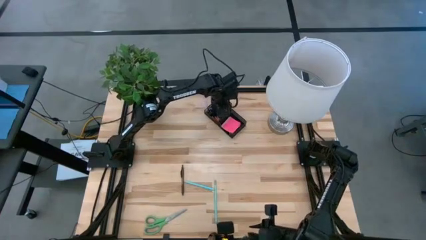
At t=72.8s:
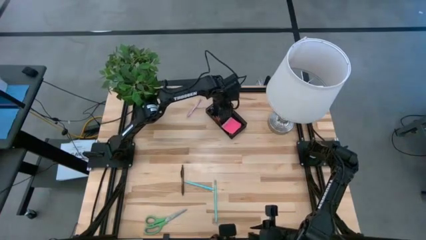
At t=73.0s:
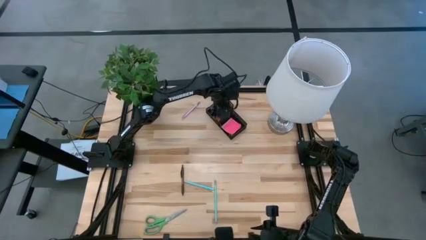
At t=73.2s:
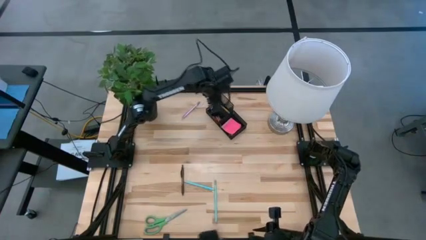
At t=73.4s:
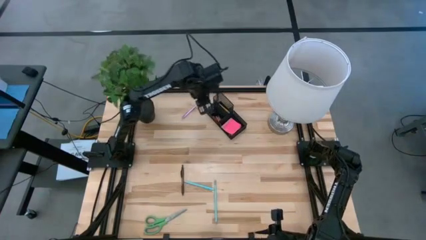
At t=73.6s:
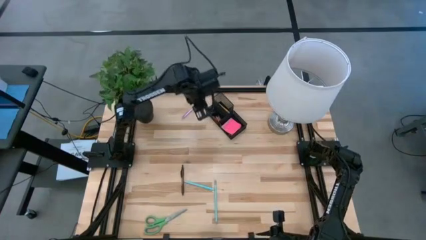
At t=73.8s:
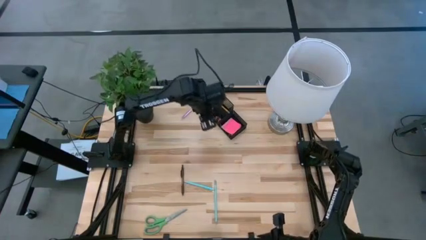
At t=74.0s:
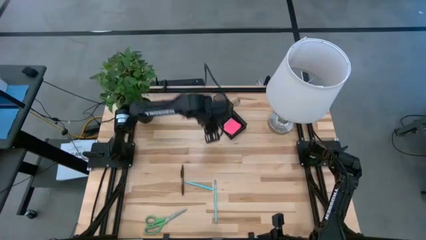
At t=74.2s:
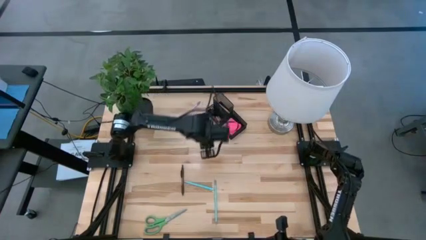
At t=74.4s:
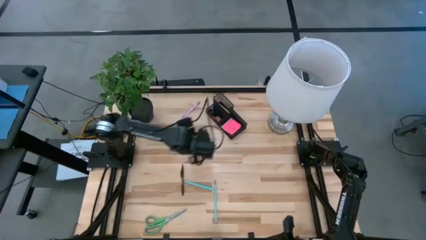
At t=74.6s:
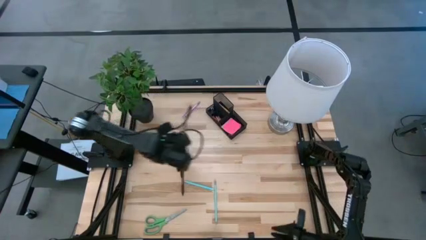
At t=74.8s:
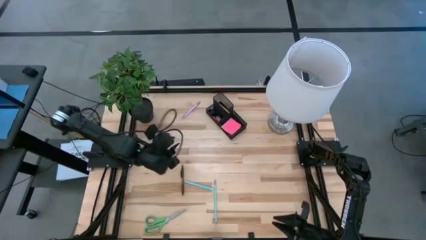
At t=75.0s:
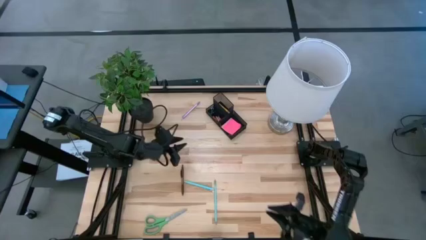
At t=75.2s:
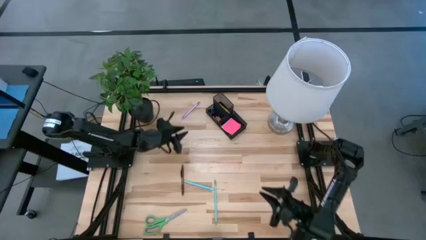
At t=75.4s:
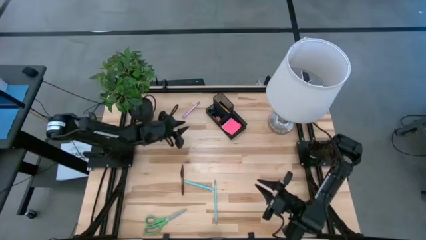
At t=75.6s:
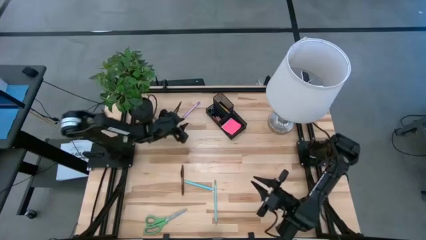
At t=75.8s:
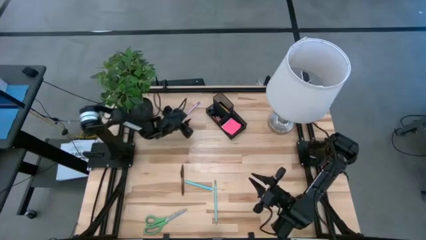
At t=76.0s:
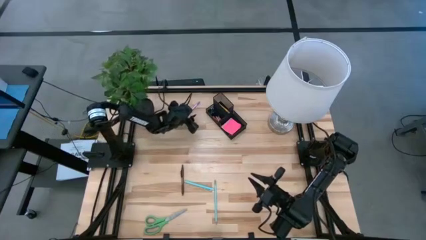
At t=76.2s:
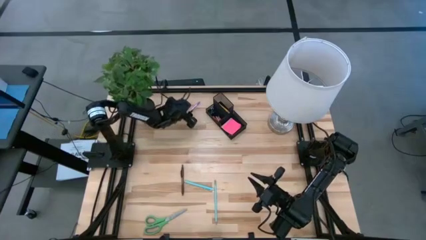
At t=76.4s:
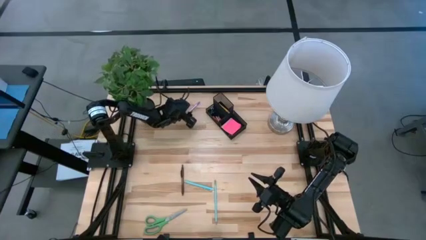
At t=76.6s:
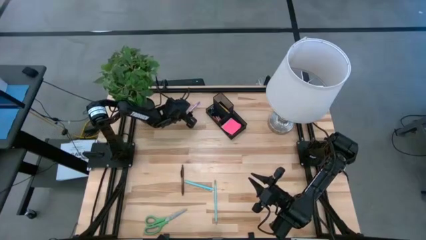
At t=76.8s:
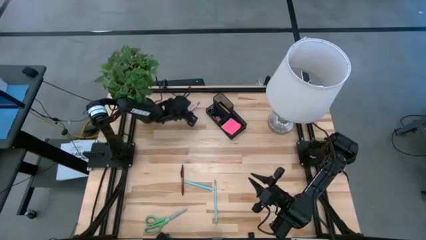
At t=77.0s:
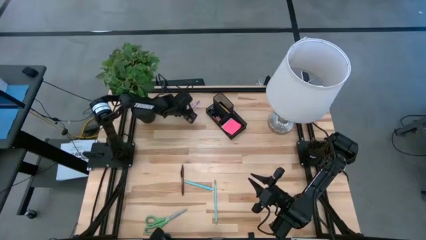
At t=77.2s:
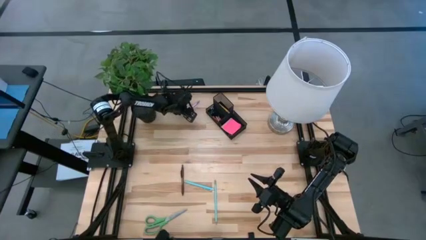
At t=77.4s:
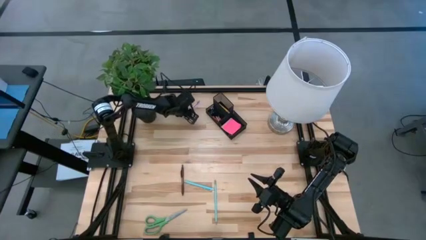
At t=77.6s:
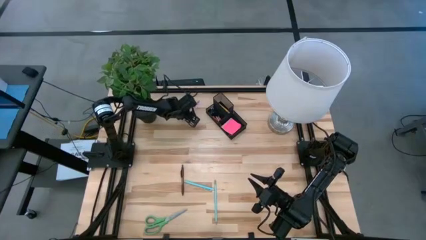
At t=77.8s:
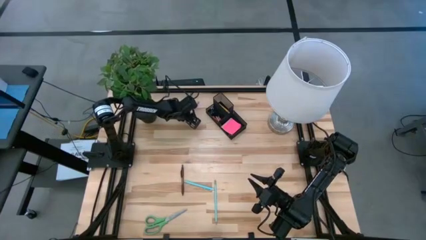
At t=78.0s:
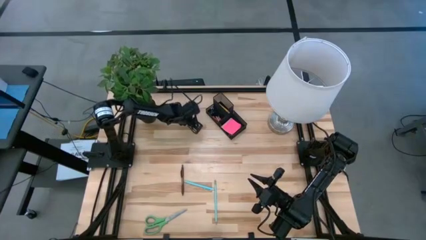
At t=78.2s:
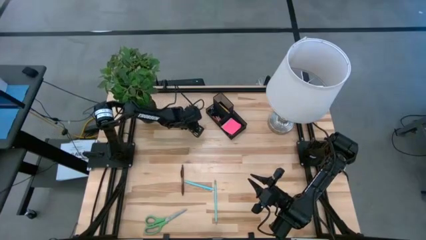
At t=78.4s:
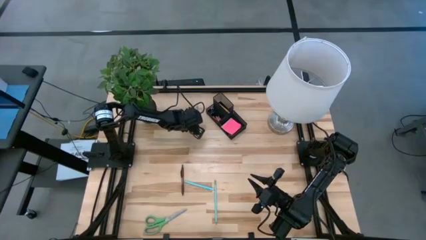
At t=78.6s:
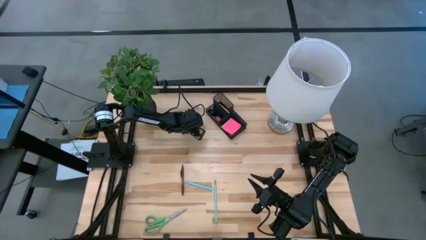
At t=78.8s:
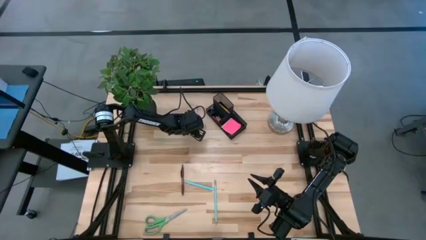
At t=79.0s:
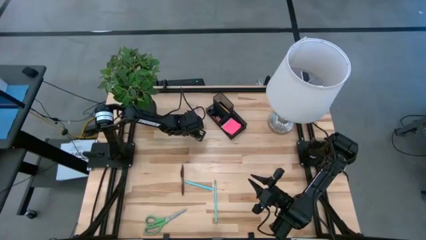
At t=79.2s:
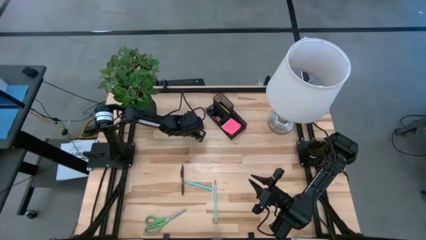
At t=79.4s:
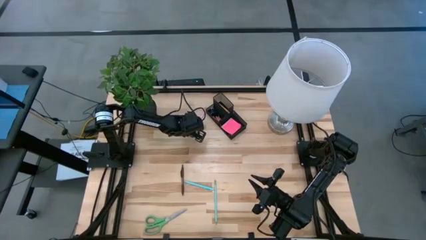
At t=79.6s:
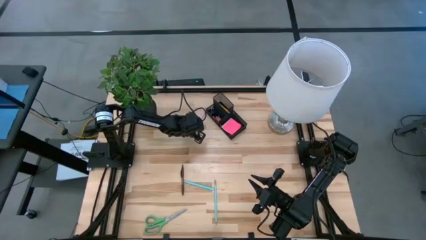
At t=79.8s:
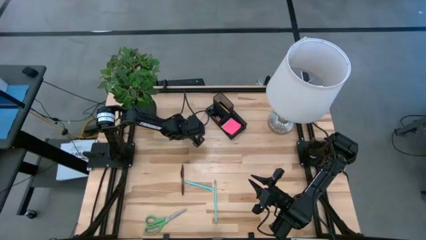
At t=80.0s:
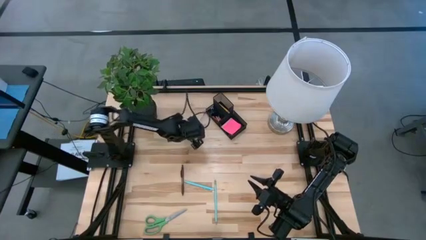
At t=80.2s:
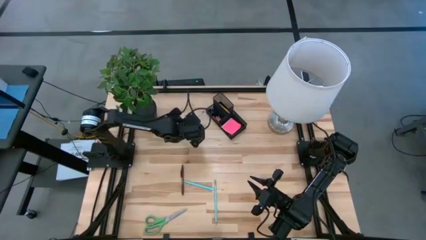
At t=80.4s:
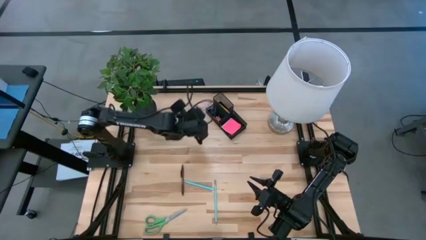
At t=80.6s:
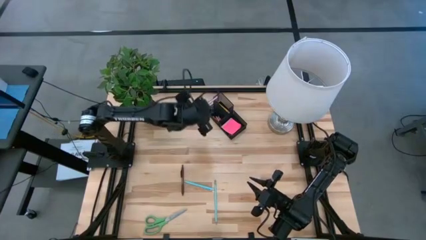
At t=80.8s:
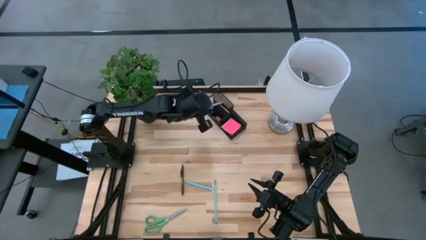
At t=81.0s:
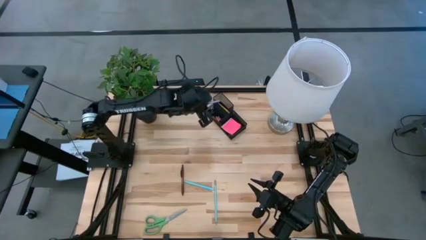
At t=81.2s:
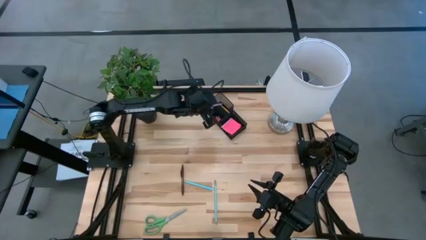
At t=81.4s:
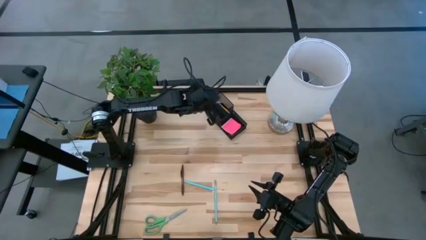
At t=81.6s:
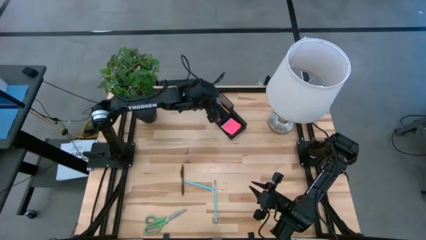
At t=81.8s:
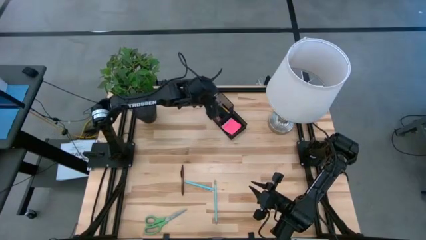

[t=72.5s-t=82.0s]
Task: Pick and place office supplies into organizer
Put the purple pen into the desk organizer

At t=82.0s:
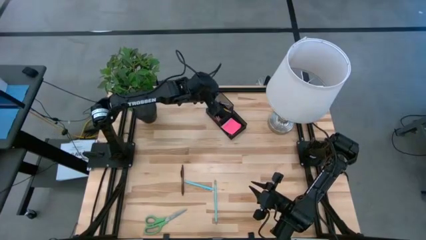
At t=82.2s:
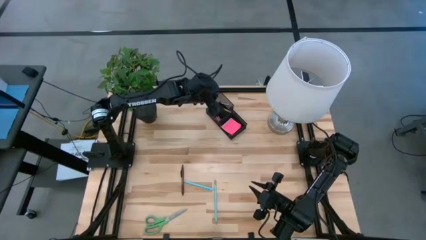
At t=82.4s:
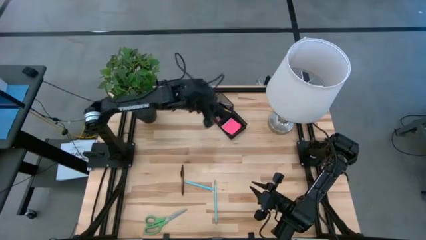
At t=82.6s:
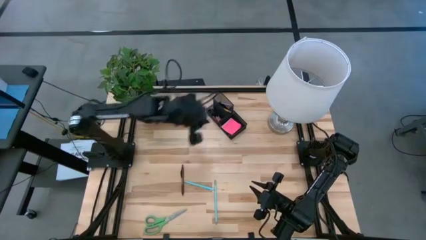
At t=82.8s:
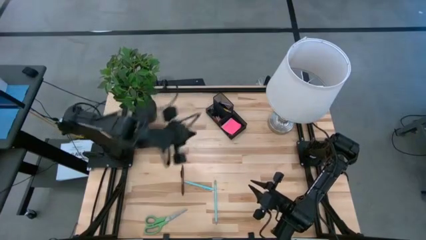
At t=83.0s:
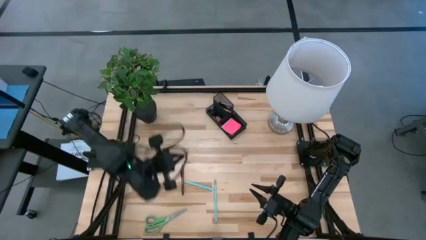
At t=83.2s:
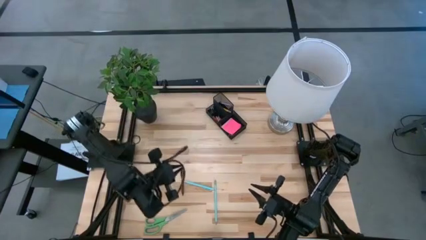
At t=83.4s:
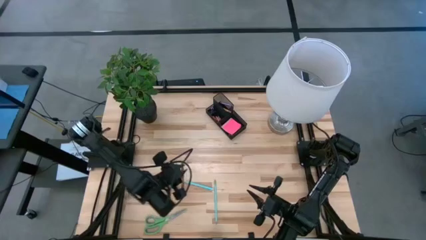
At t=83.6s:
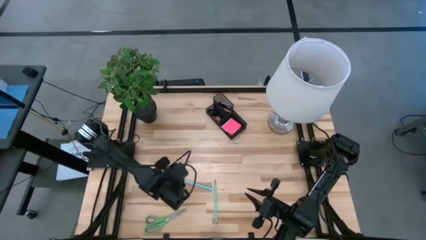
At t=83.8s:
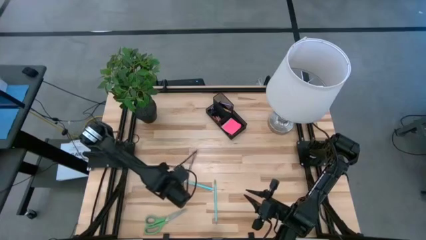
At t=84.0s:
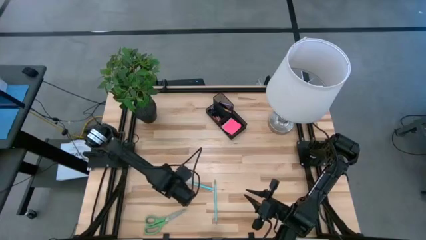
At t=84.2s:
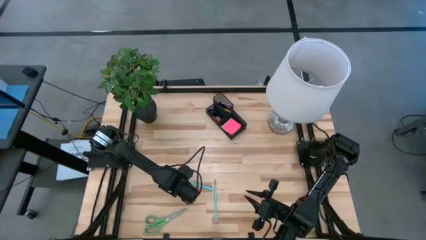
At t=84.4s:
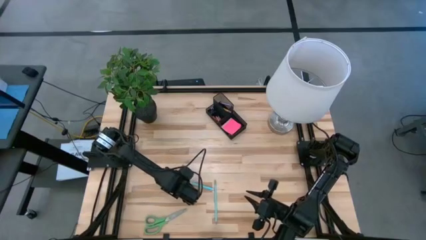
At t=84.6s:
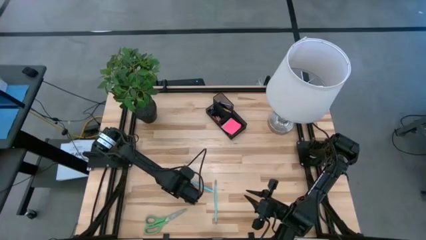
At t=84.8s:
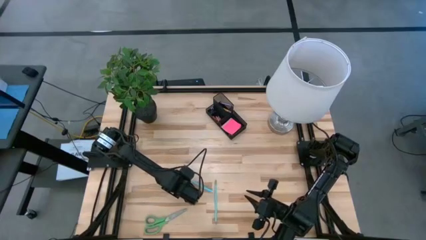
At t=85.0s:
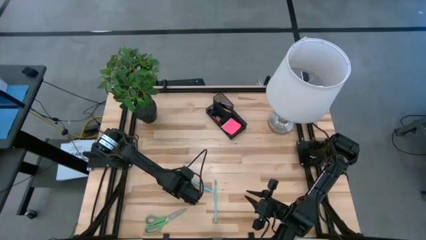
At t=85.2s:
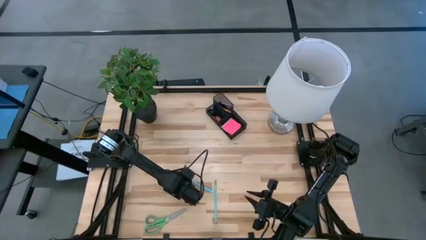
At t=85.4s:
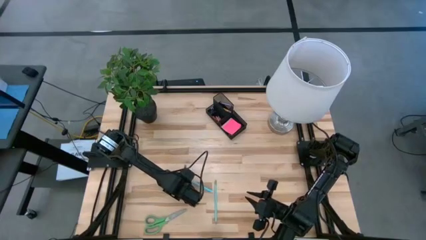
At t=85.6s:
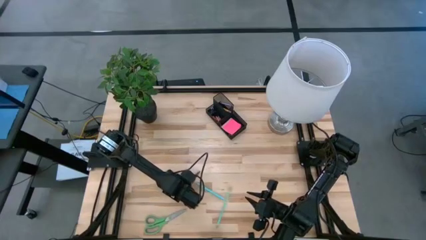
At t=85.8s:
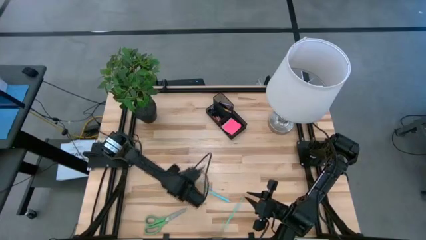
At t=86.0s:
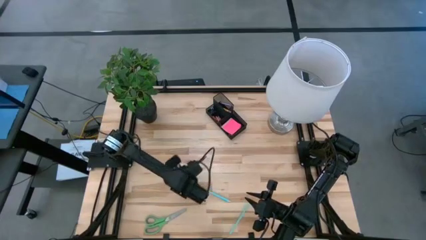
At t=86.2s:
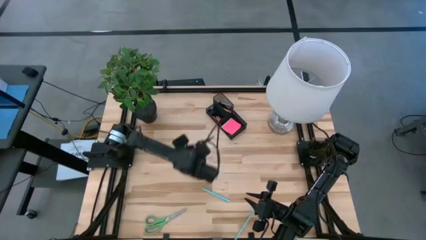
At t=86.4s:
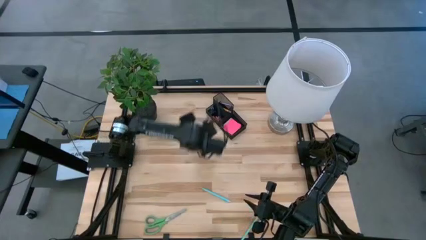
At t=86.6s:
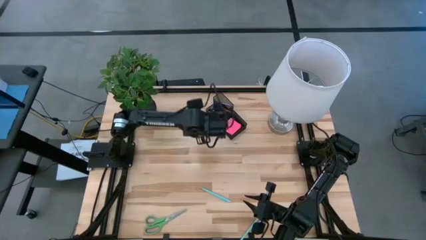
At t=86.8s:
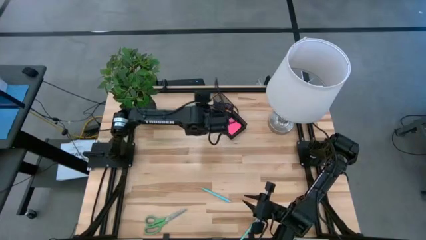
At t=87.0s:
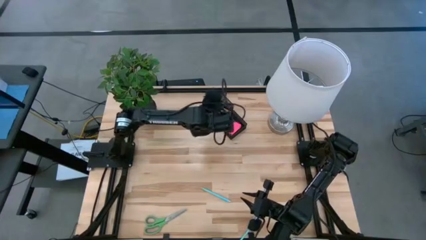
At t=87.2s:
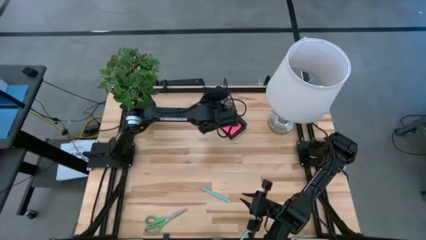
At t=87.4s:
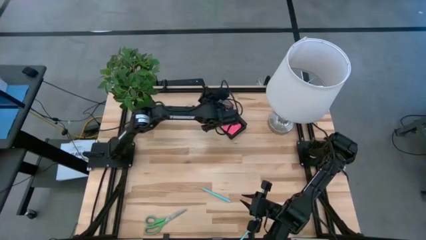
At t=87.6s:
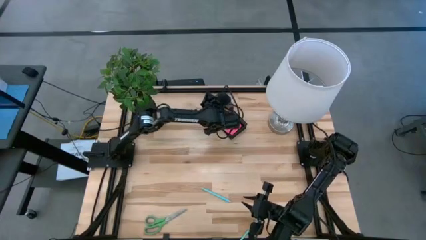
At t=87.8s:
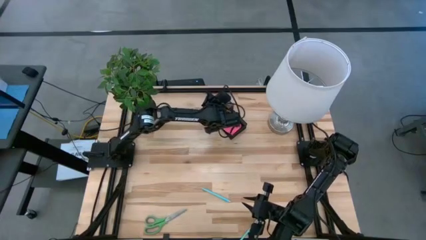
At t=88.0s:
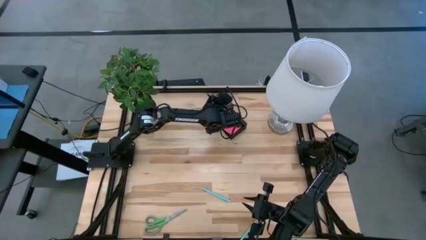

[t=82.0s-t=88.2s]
Put the brown pen into the desk organizer

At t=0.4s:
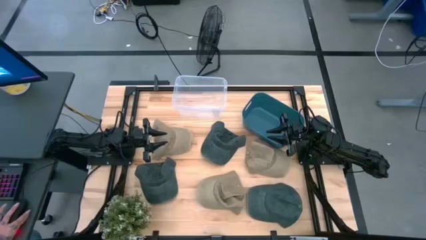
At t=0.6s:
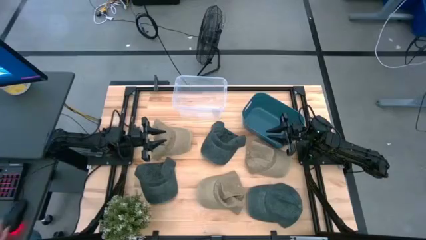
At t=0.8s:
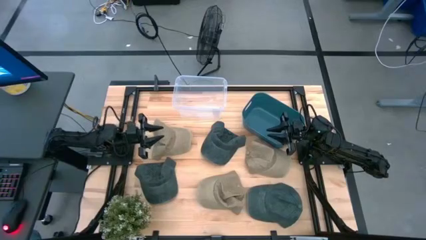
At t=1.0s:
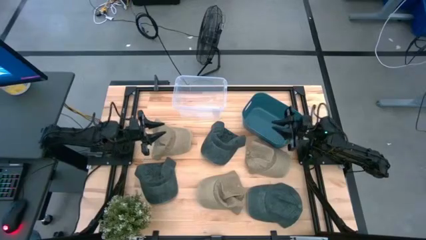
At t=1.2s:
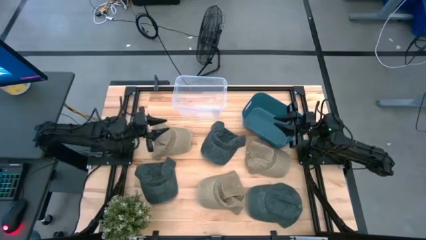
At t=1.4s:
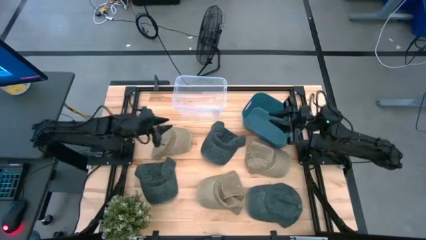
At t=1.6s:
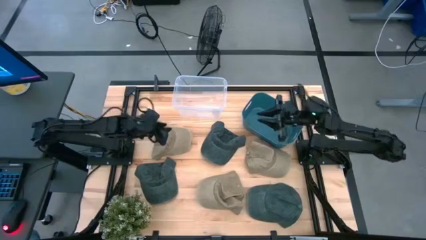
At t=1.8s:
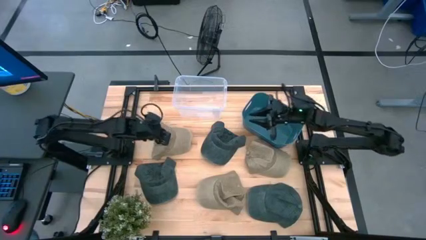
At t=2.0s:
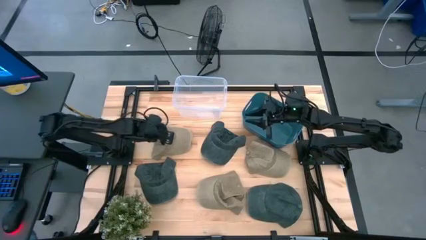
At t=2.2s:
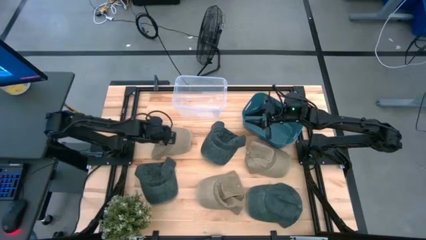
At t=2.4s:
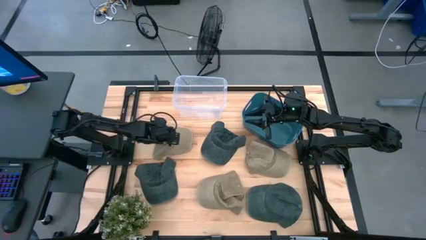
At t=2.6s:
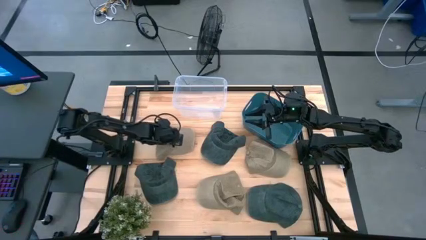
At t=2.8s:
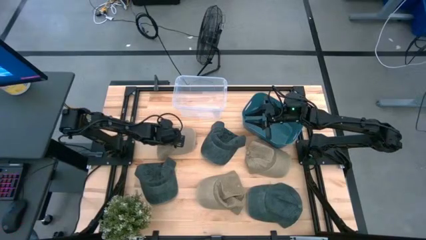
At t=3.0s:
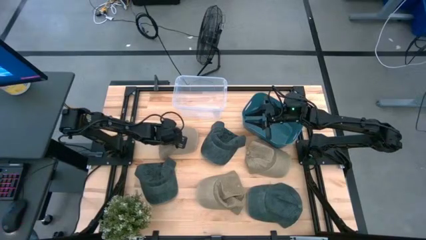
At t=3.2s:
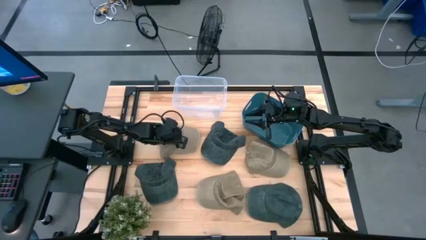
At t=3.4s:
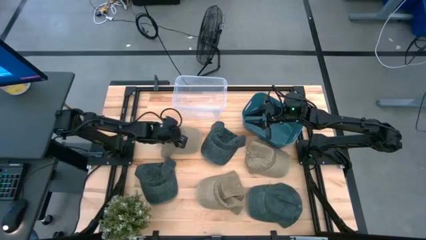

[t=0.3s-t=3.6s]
Task: Pick & Place hat
Put the top left brown cap into the transparent bin
